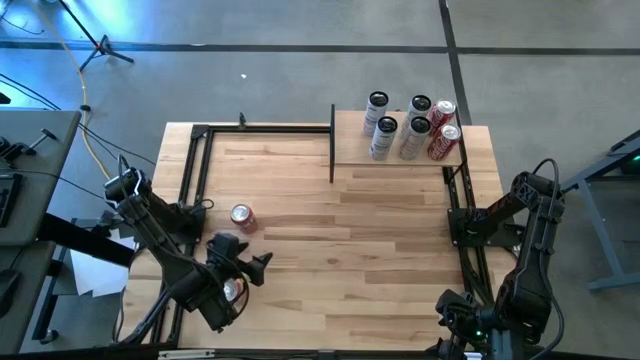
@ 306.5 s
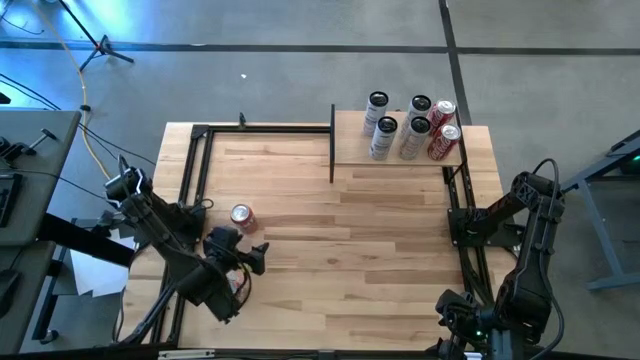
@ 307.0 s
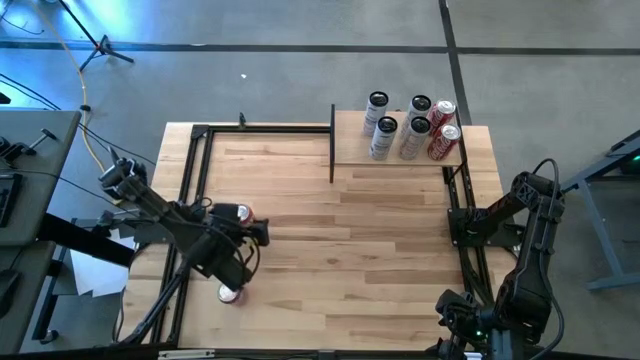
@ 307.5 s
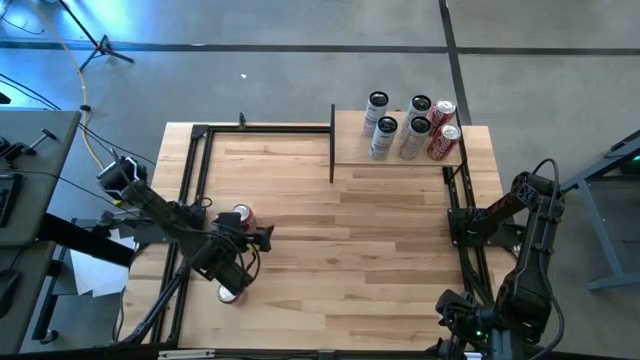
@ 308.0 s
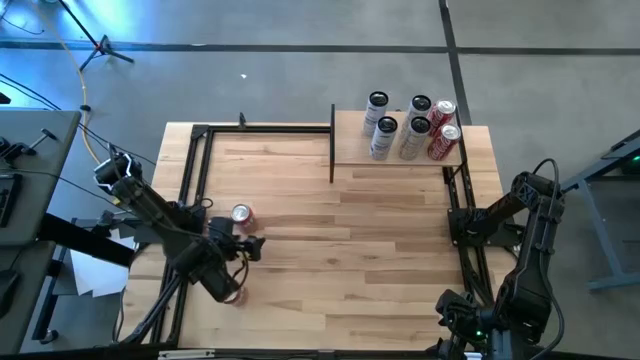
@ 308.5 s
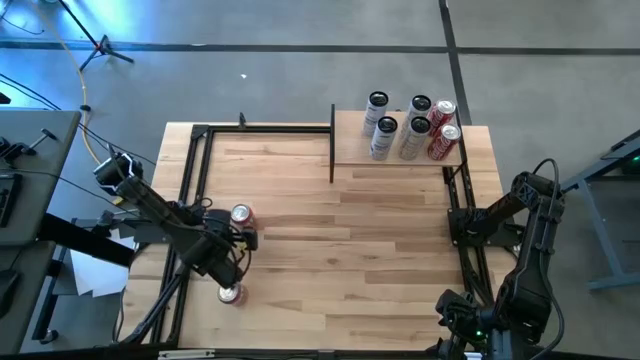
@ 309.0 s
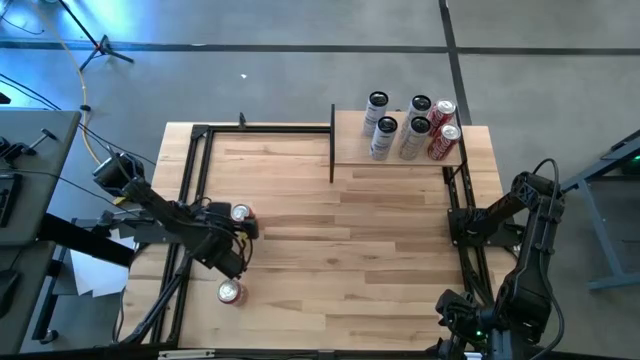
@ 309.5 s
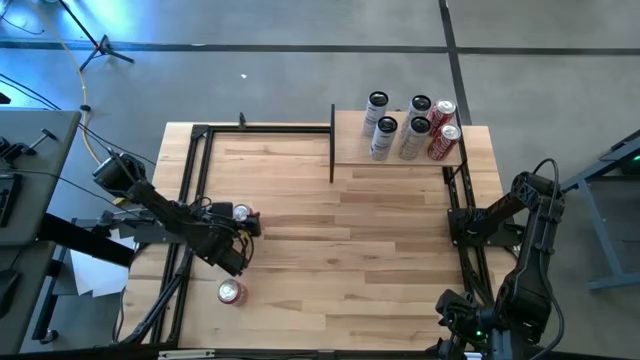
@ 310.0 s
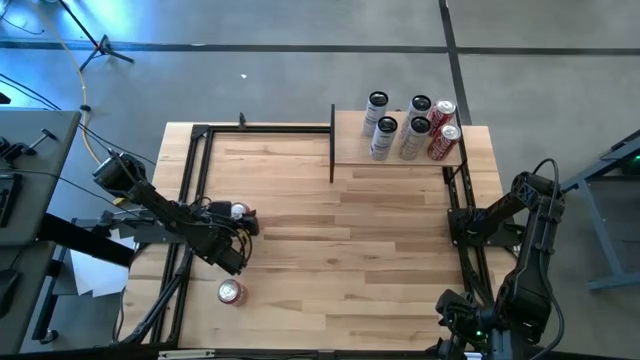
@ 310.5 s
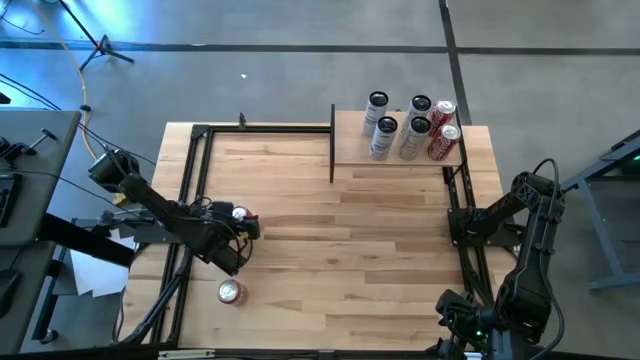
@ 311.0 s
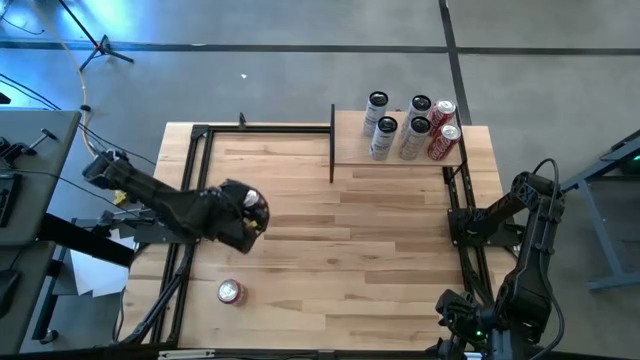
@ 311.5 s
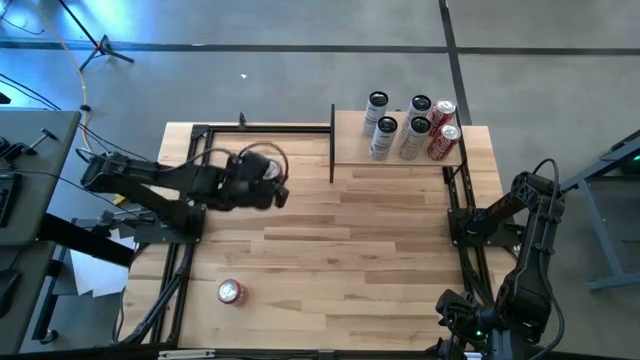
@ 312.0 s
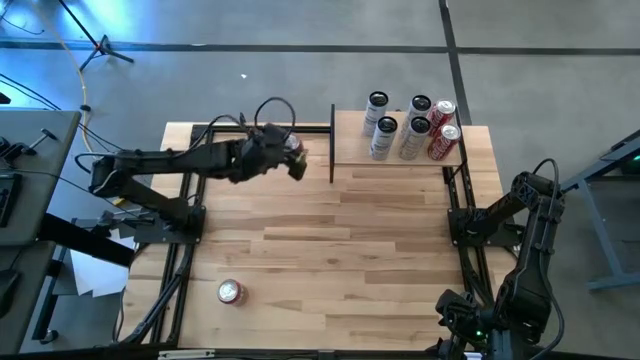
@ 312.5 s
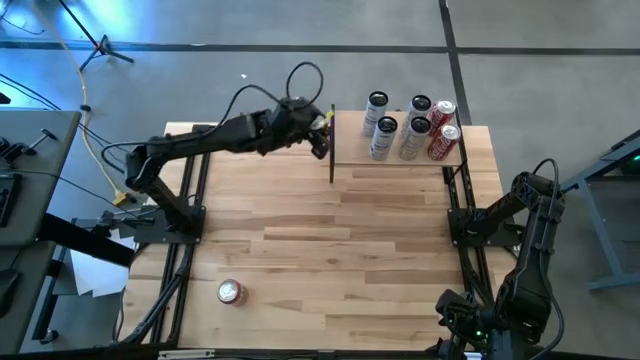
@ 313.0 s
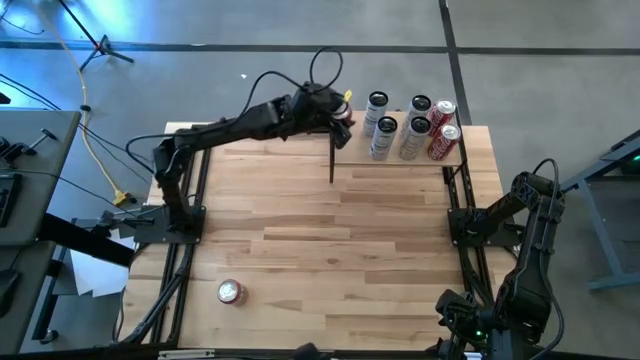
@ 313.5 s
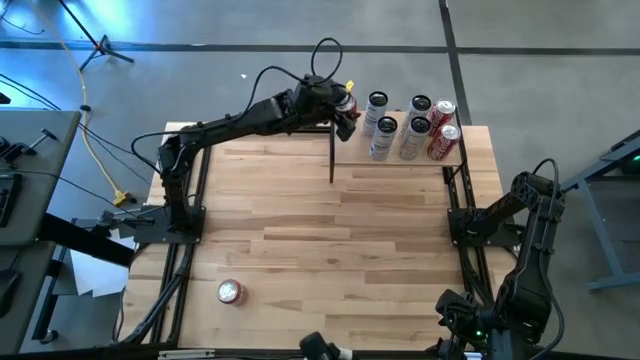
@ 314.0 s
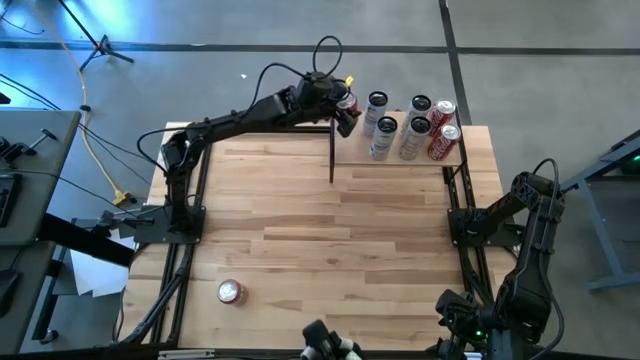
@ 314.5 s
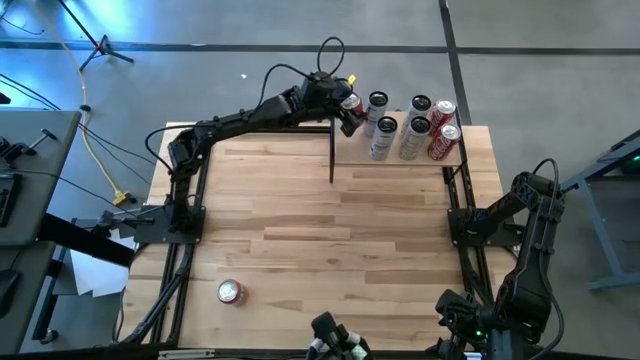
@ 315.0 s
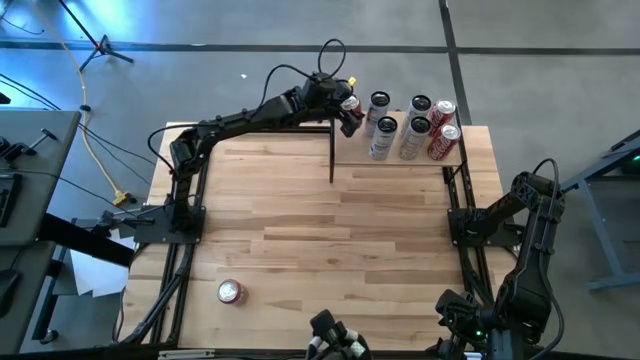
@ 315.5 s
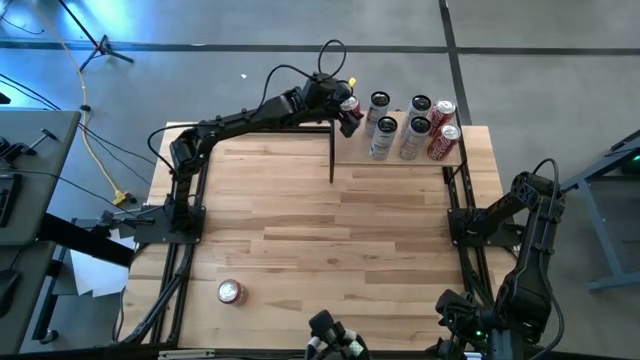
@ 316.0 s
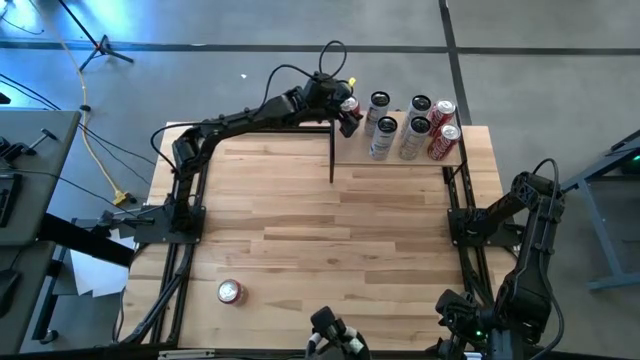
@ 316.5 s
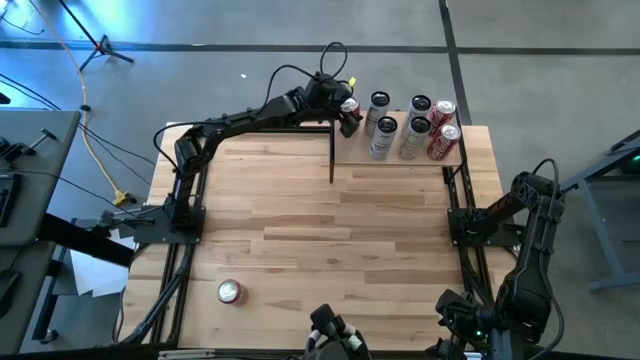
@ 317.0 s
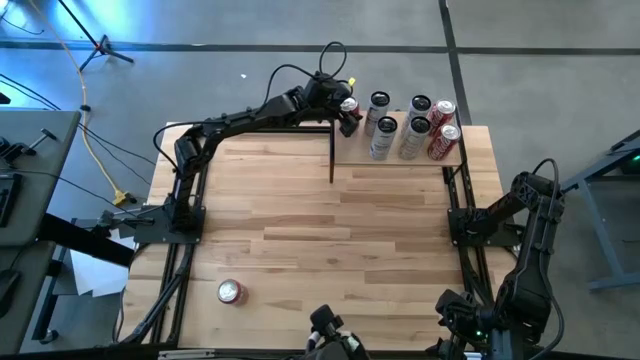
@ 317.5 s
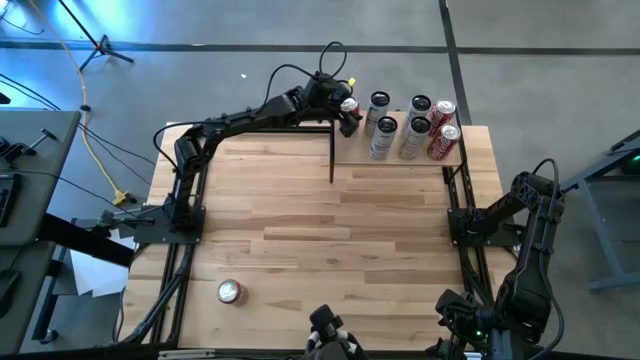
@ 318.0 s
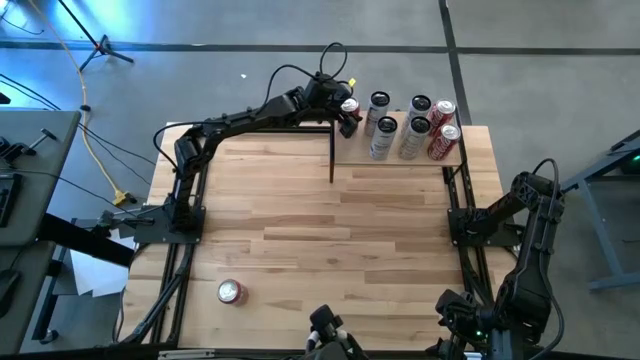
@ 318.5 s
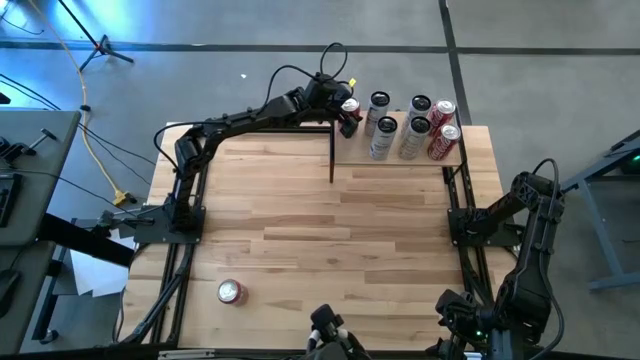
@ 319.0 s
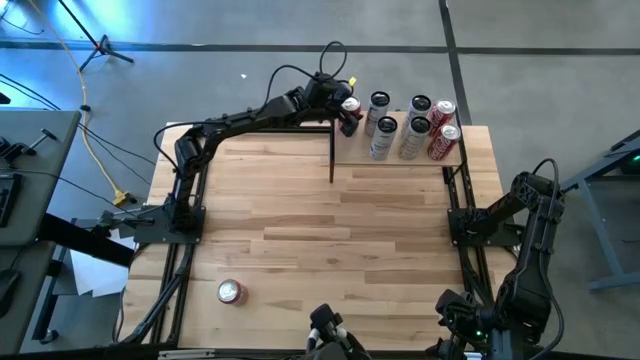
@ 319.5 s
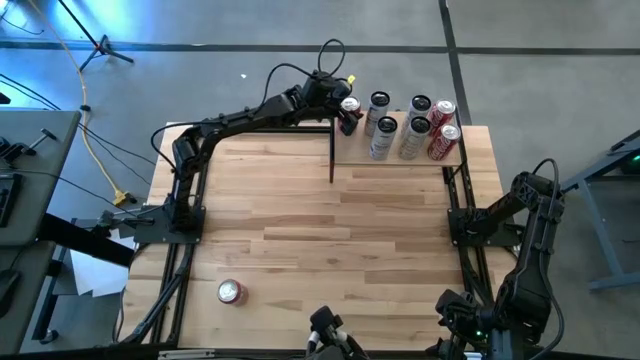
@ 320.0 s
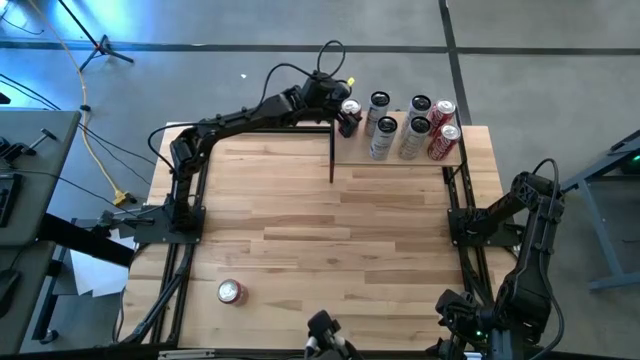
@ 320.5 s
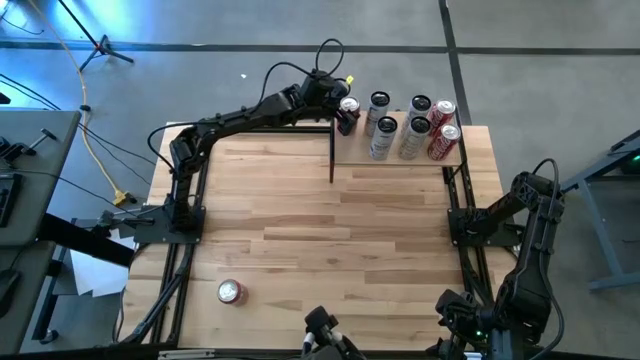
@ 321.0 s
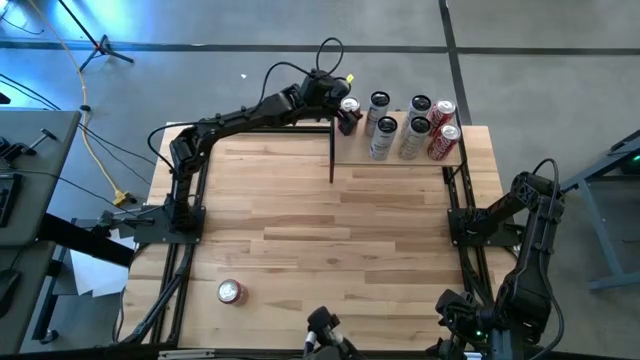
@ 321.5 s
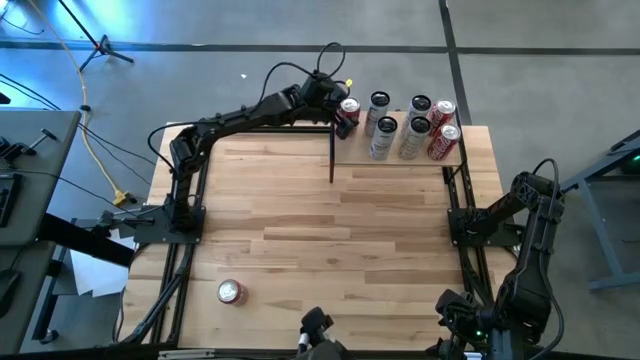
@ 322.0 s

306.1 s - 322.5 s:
Task: Place canned beverage on shelf
Put the orange soda can on the shelf

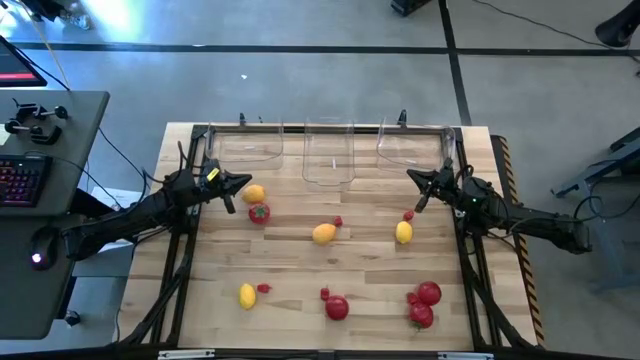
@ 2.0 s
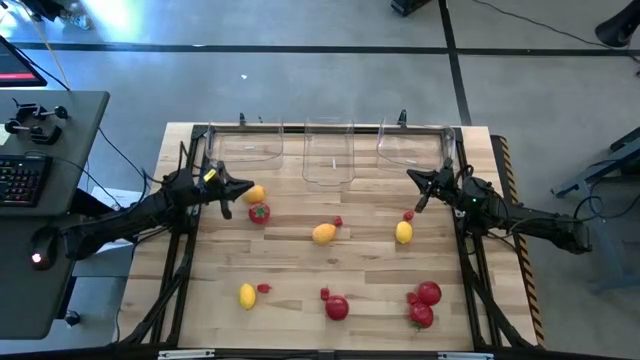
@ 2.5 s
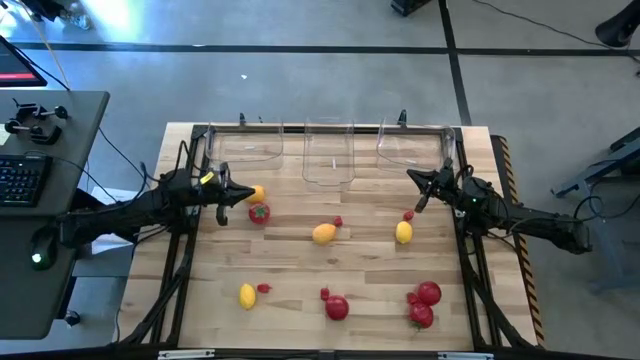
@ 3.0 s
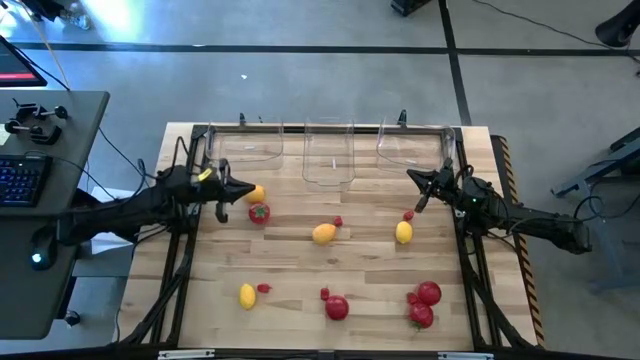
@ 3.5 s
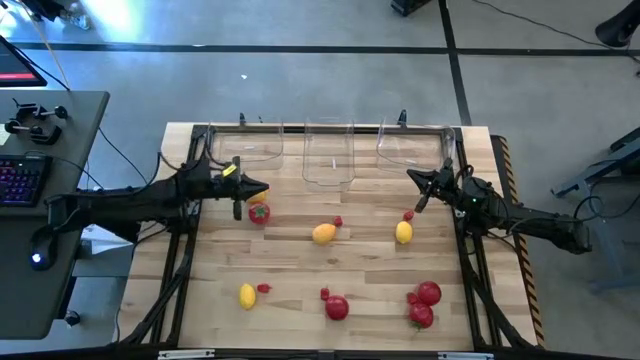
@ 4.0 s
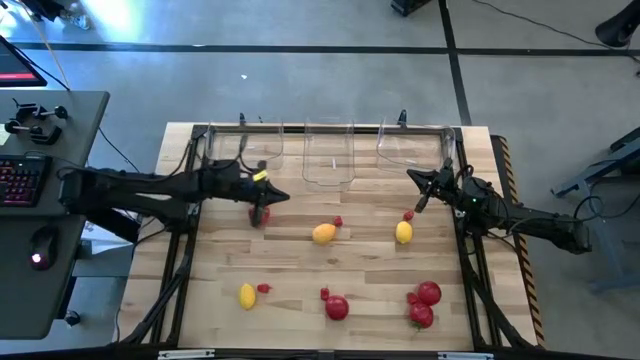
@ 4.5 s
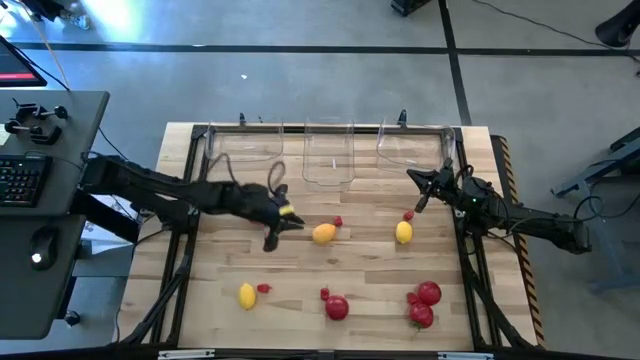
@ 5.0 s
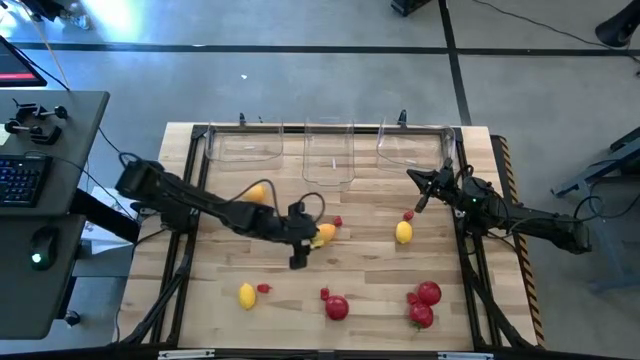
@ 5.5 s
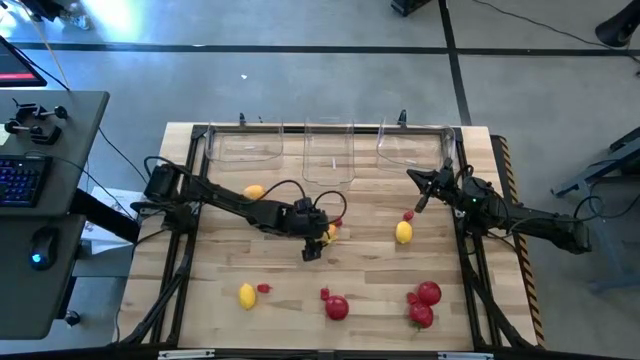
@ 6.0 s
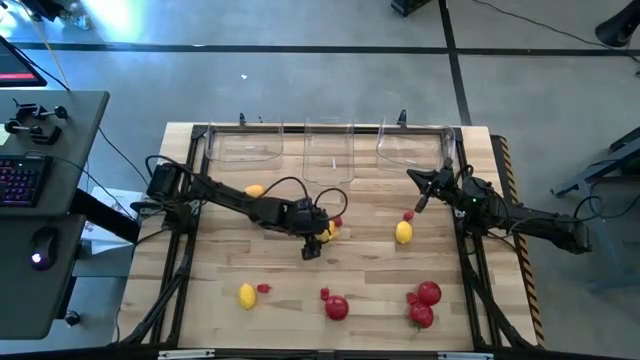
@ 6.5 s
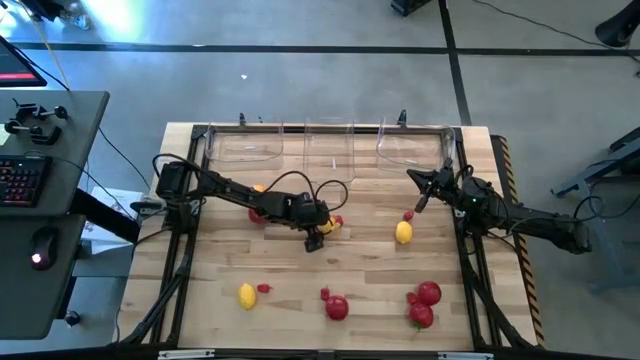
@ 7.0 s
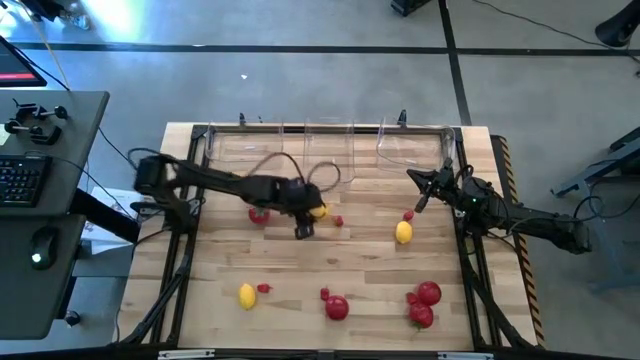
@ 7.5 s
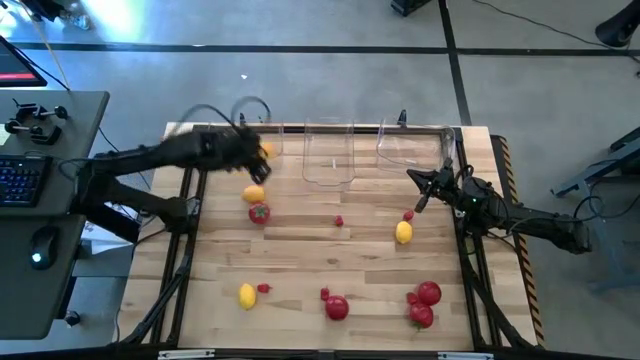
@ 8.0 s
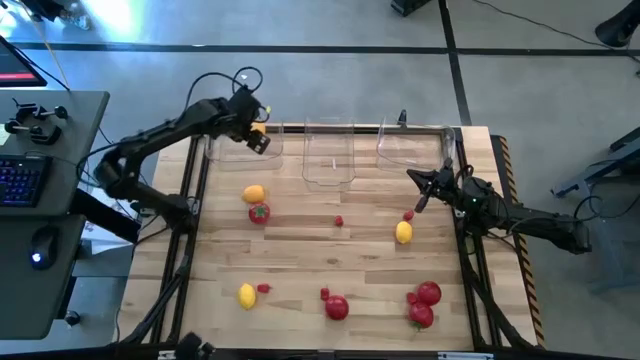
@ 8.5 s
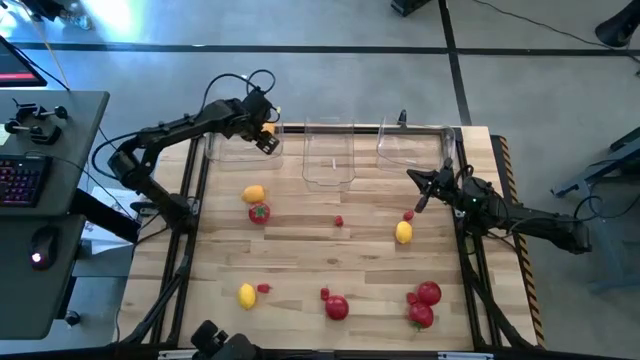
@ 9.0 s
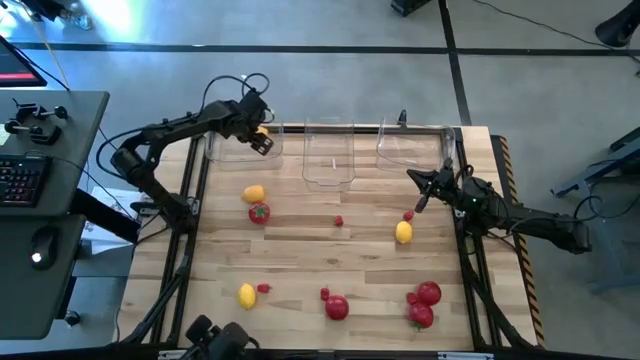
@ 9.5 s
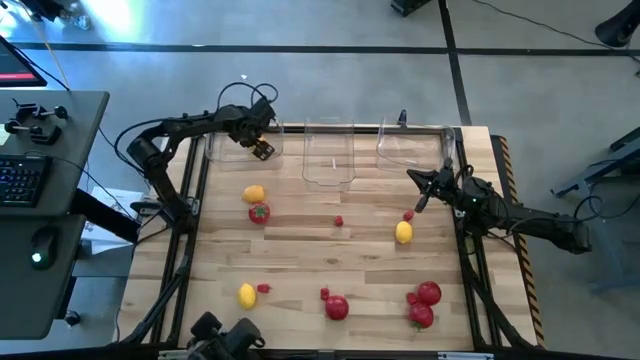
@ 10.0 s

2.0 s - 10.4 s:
Task: Sort produce into baskets
Put the lemon into the left transparent bin
